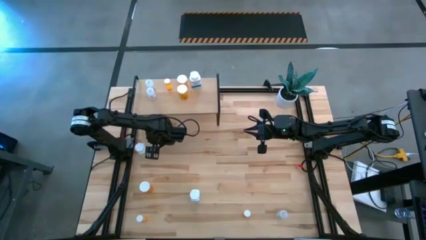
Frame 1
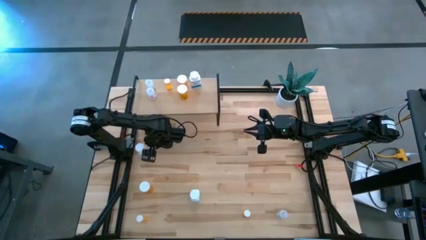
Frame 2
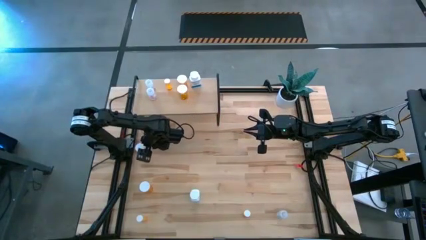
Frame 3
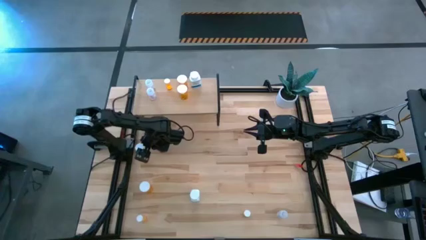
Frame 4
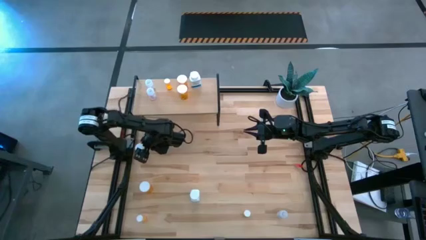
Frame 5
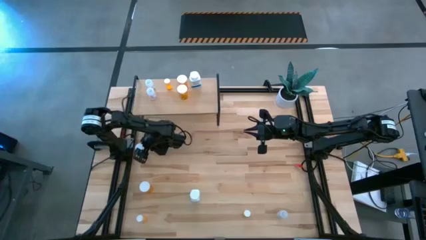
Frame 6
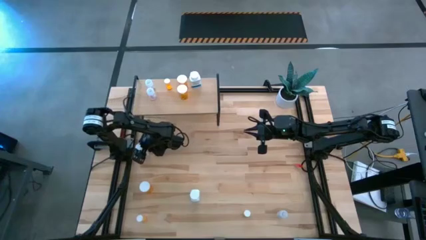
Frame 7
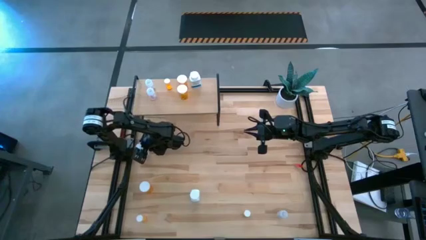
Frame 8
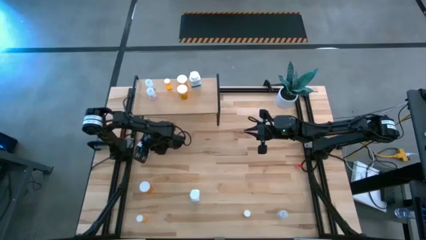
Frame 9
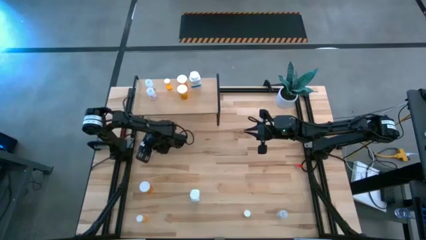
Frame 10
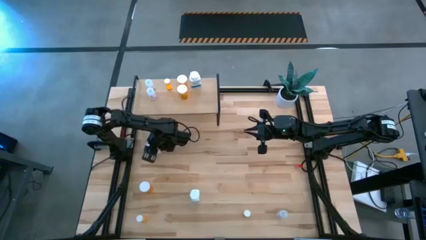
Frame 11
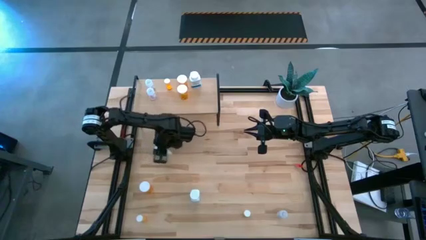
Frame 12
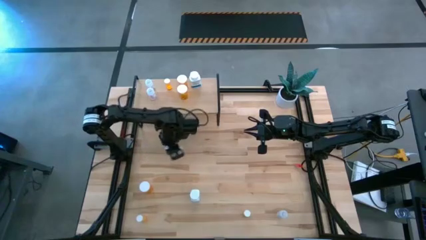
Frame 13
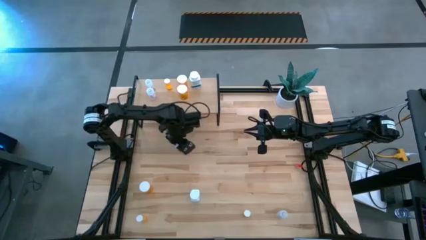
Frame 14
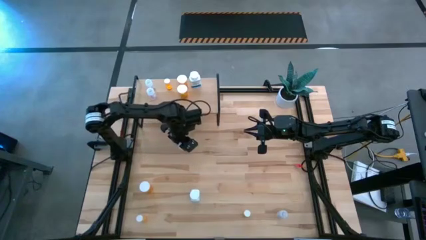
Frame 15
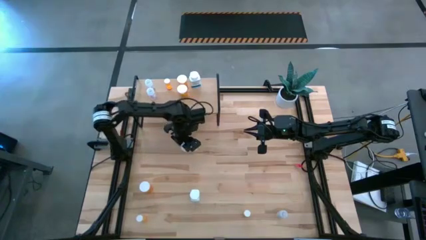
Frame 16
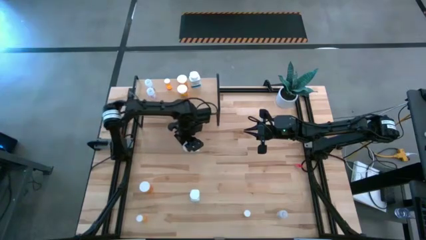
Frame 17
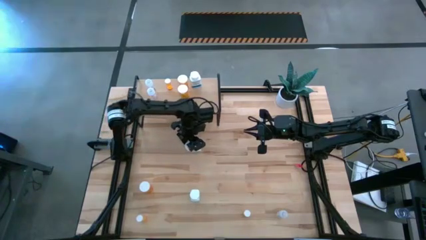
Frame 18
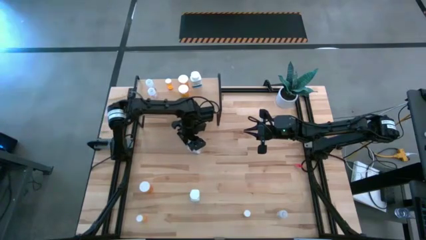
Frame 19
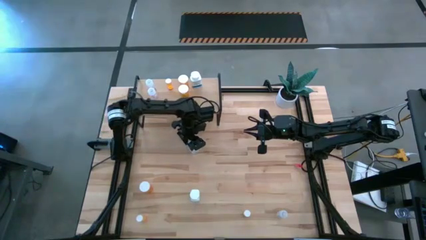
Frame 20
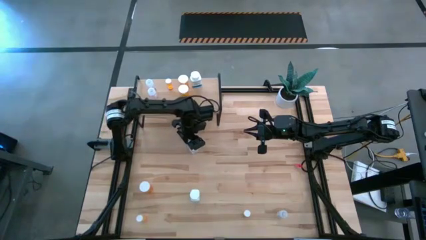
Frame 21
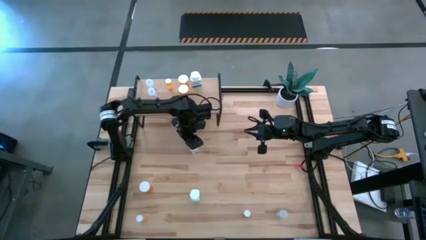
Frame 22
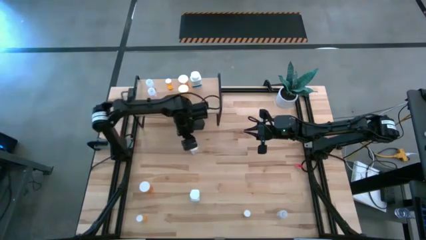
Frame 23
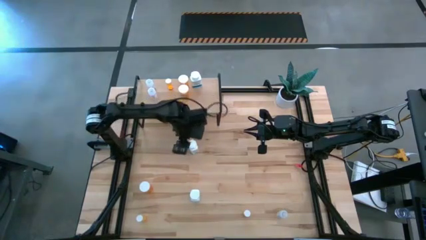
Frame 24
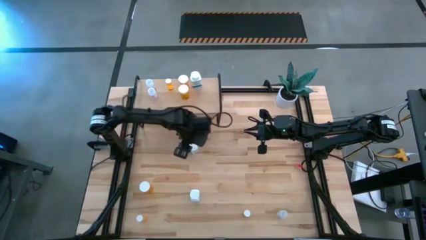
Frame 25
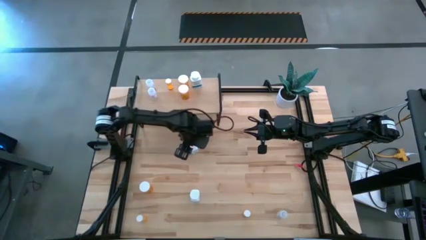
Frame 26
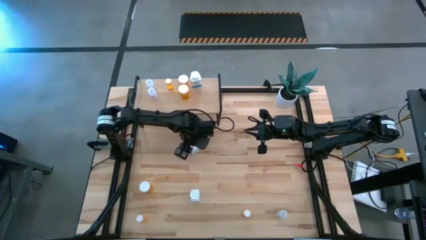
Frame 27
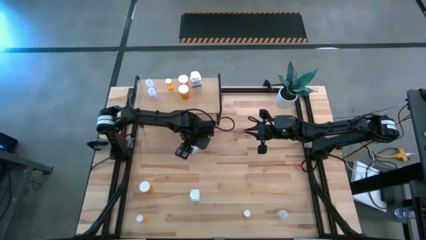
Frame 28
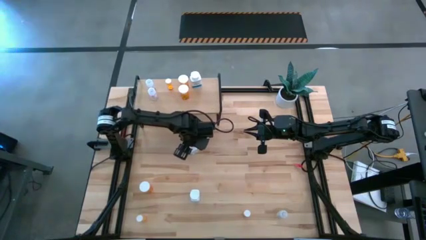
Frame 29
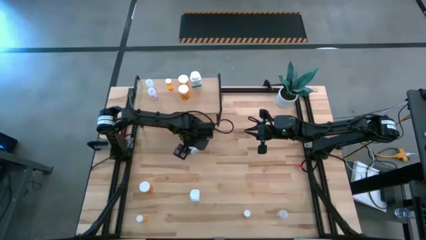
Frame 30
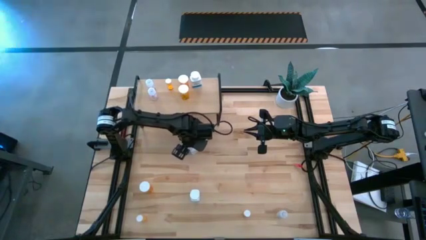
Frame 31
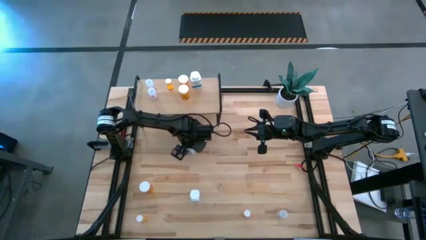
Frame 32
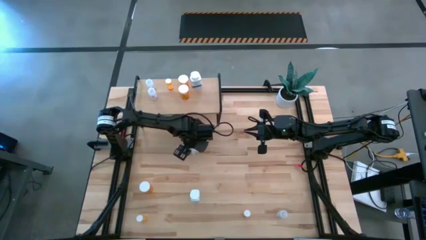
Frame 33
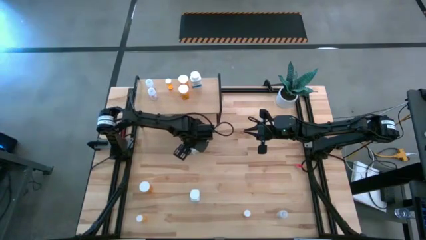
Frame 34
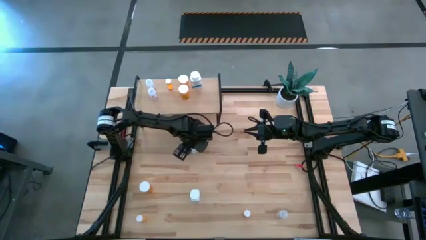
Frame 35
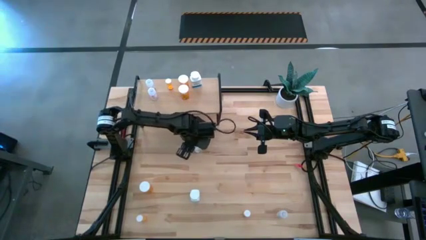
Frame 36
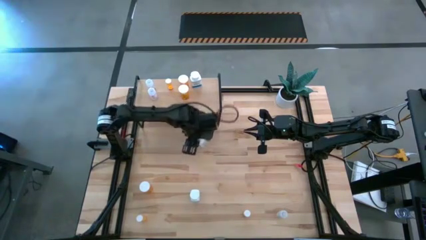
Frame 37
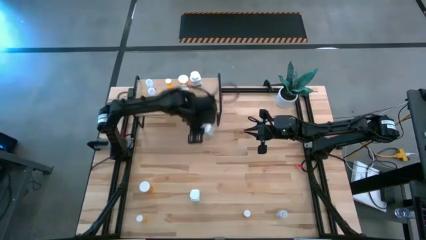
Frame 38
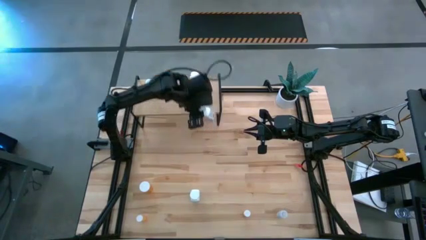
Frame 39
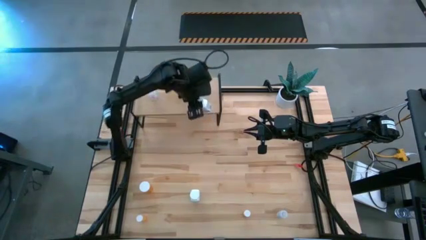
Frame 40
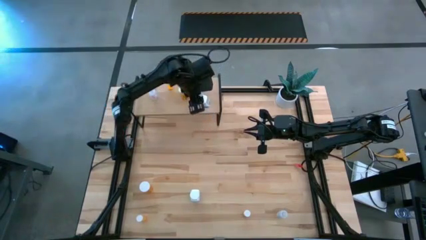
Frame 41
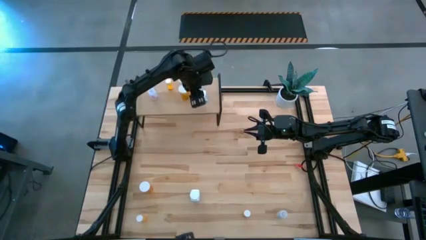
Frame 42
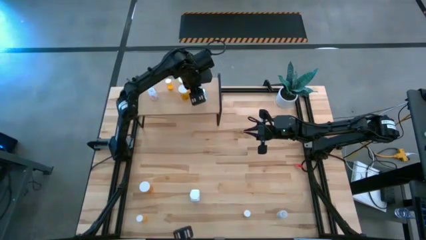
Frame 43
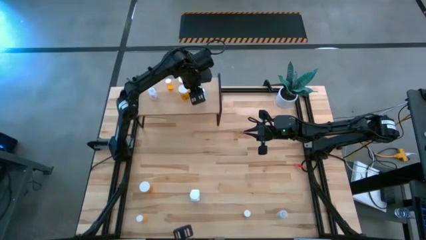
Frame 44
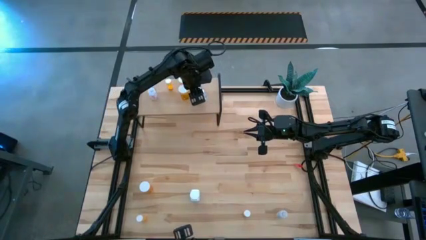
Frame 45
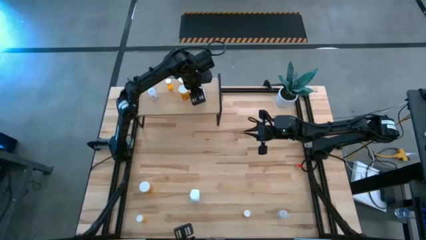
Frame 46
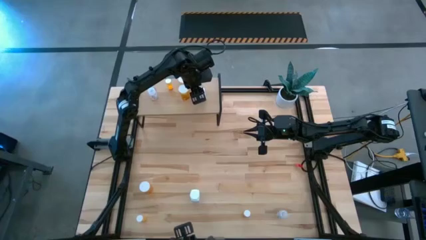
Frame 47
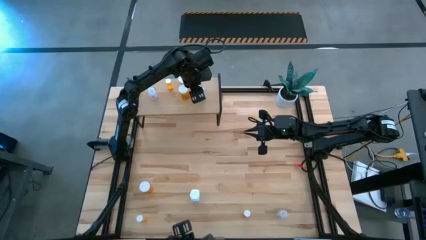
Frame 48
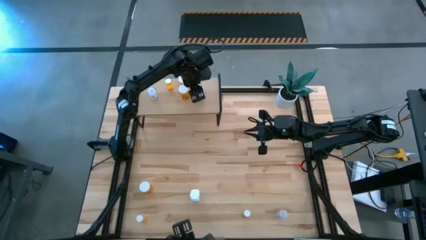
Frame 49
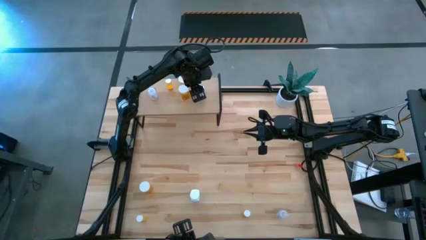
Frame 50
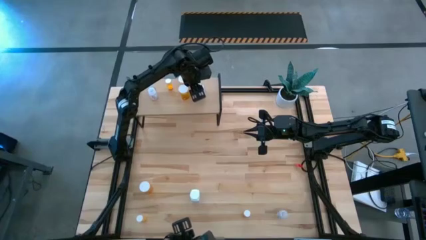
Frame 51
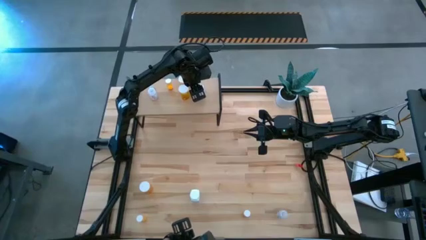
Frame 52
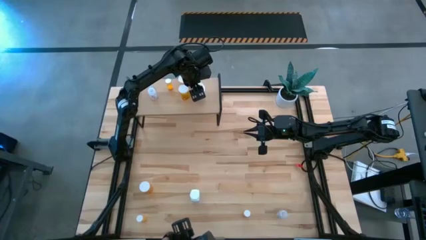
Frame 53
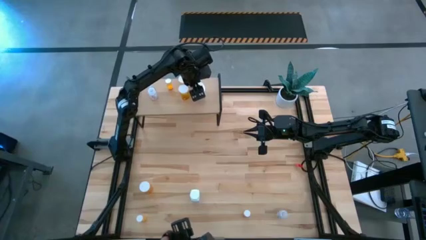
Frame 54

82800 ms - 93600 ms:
Task: Pick and place medicine bottles onto shelf by color
Put the top white pill bottle aligned with the other white pill bottle on the shelf

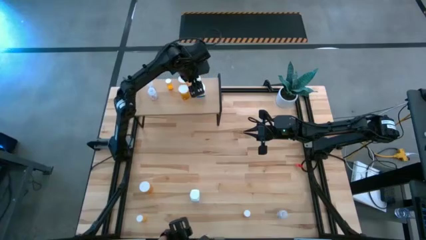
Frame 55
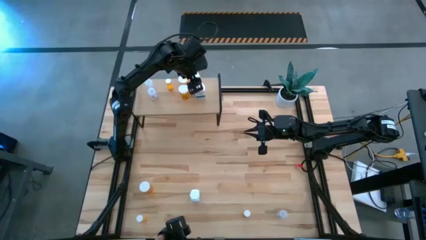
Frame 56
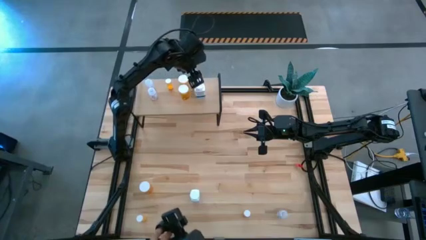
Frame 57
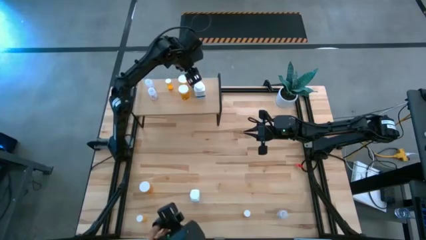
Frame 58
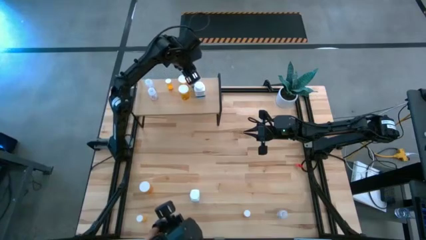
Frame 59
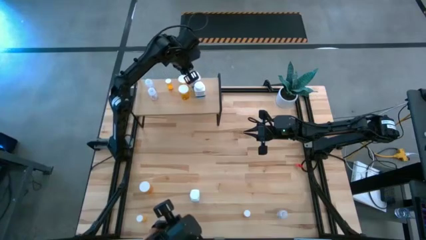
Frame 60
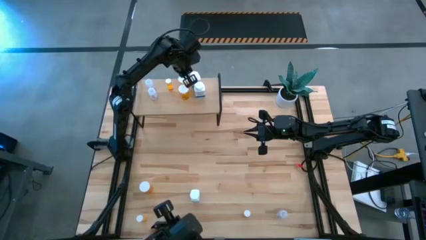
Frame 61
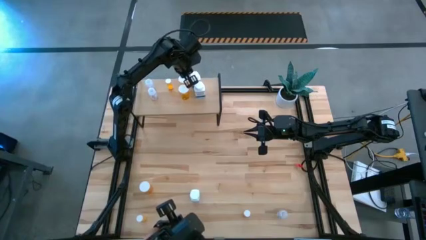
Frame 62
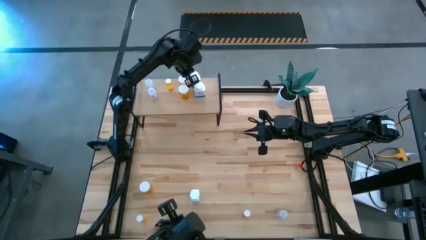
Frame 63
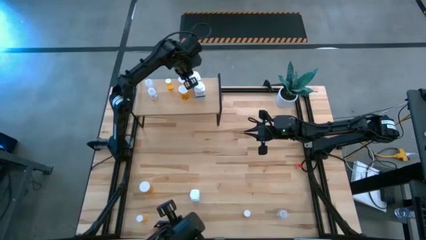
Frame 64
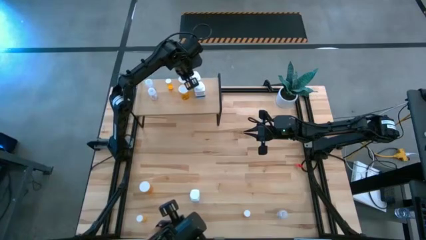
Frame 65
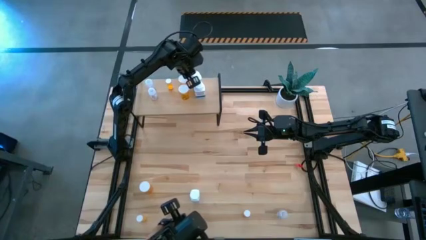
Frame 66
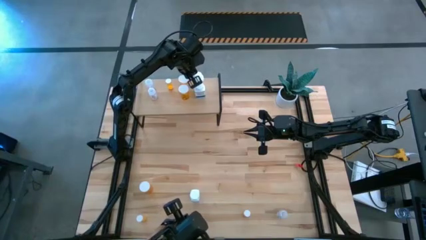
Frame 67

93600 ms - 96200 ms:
Adjust the white pill bottle on the shelf
